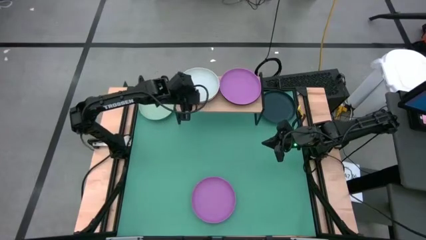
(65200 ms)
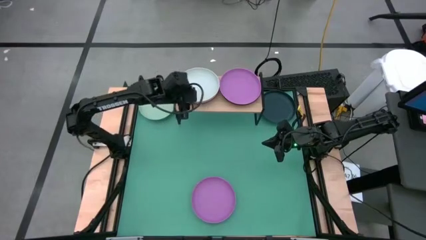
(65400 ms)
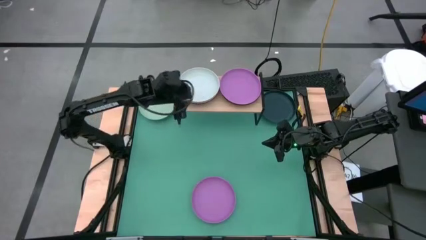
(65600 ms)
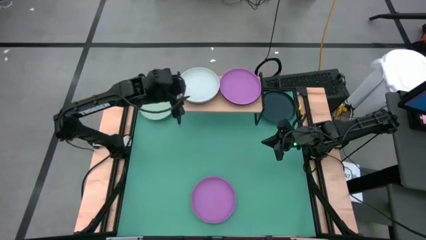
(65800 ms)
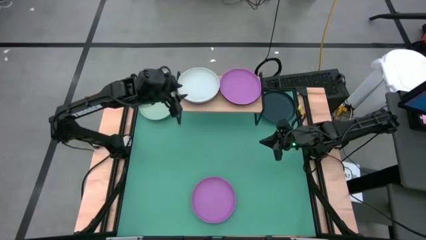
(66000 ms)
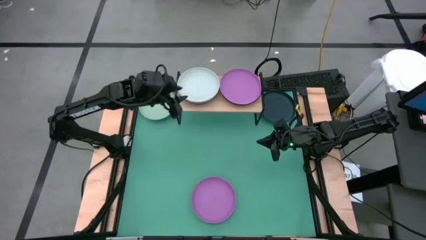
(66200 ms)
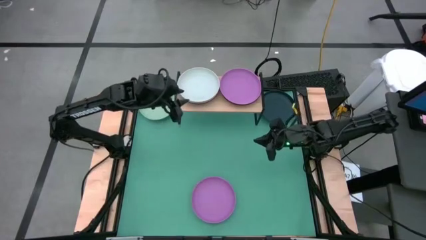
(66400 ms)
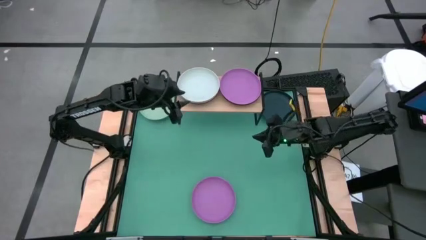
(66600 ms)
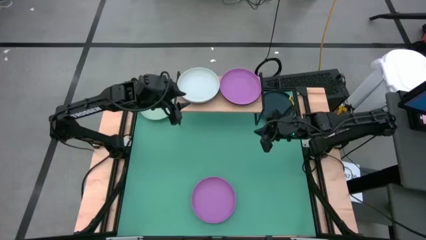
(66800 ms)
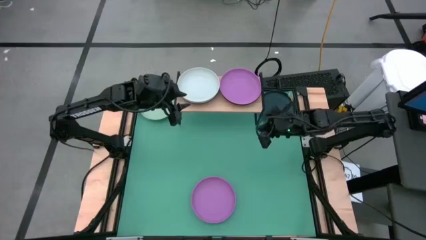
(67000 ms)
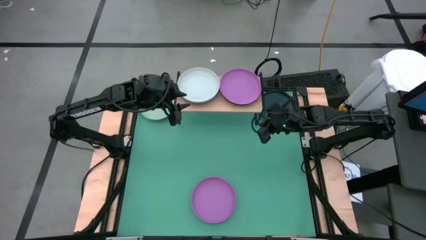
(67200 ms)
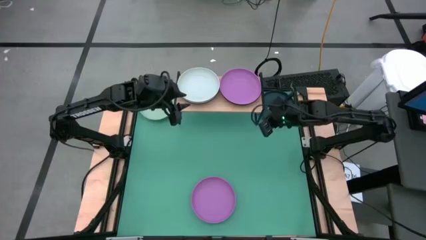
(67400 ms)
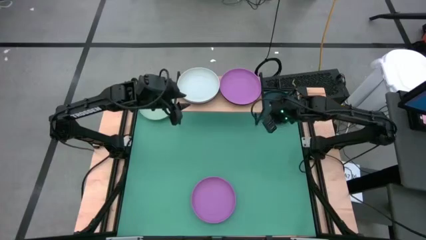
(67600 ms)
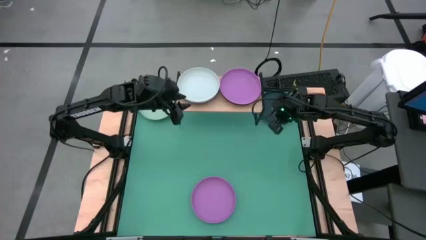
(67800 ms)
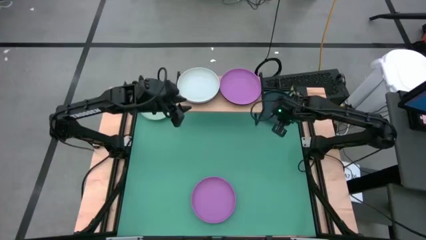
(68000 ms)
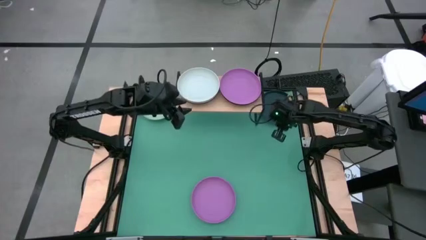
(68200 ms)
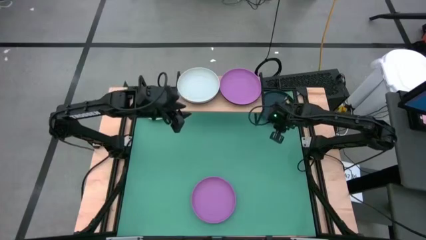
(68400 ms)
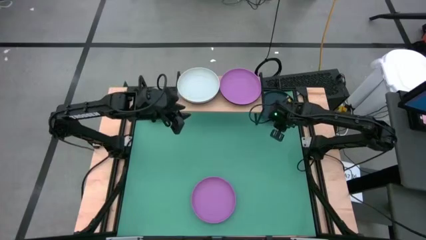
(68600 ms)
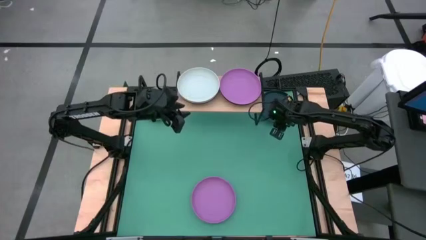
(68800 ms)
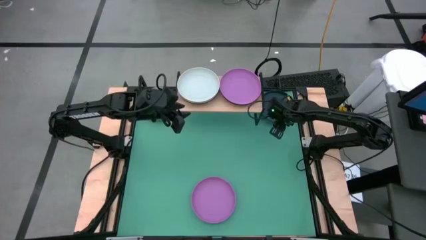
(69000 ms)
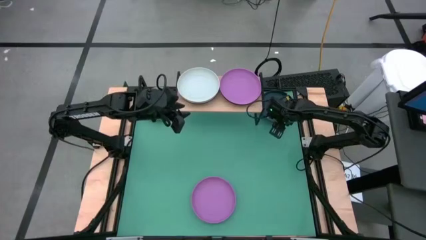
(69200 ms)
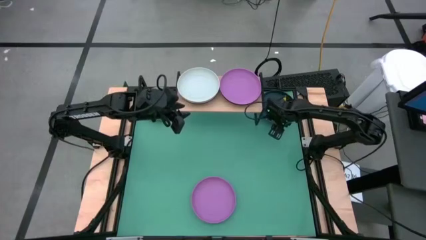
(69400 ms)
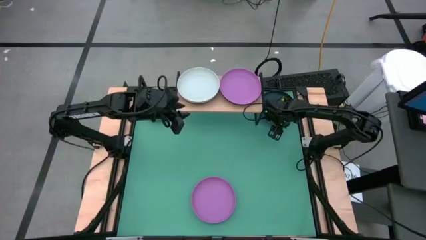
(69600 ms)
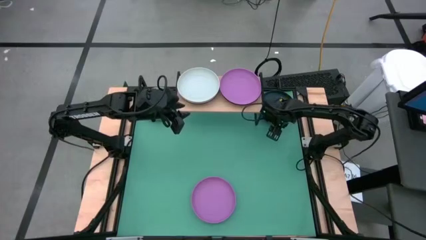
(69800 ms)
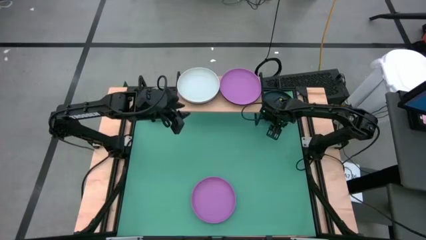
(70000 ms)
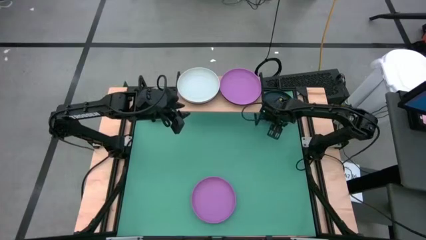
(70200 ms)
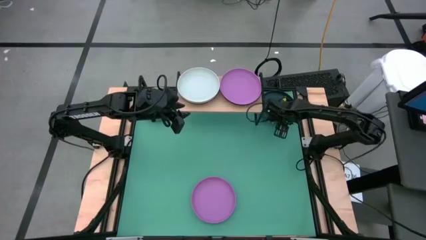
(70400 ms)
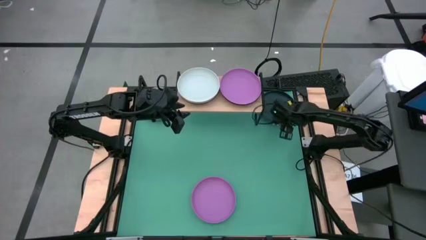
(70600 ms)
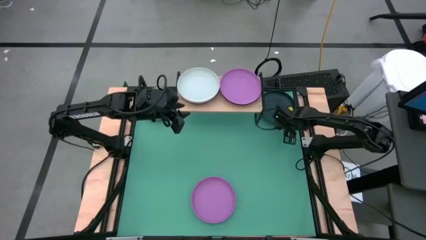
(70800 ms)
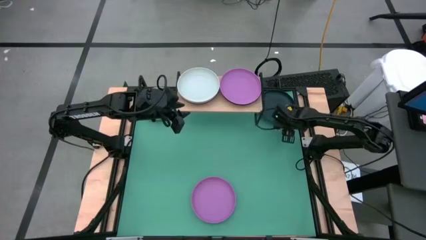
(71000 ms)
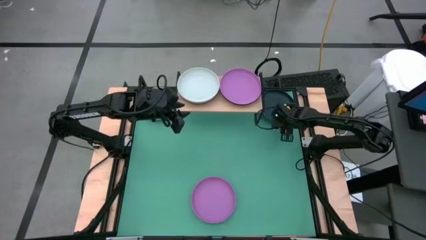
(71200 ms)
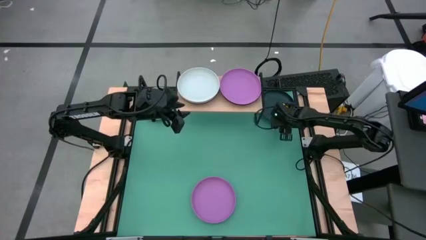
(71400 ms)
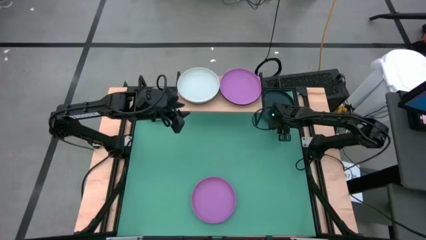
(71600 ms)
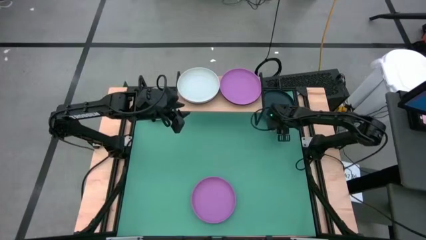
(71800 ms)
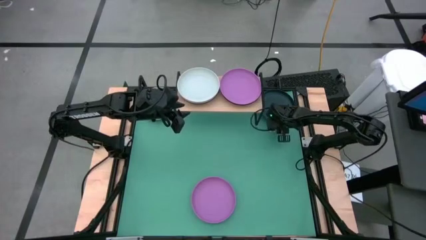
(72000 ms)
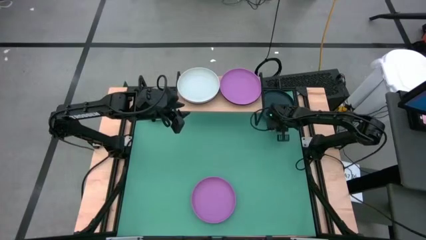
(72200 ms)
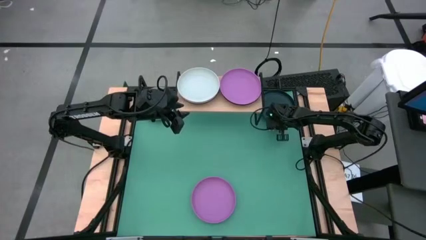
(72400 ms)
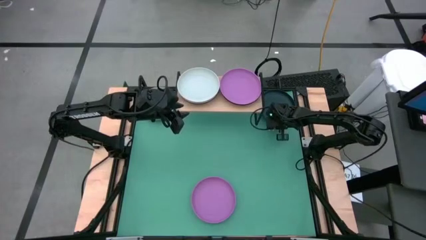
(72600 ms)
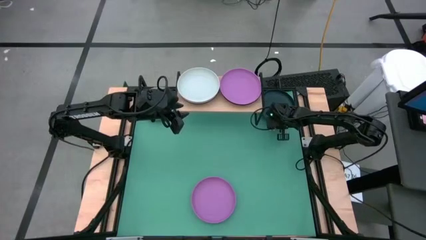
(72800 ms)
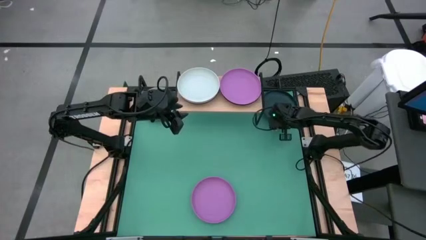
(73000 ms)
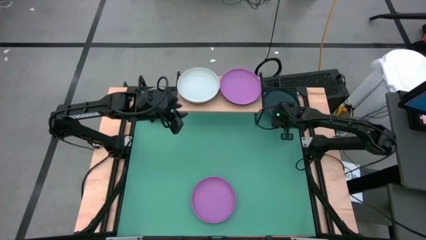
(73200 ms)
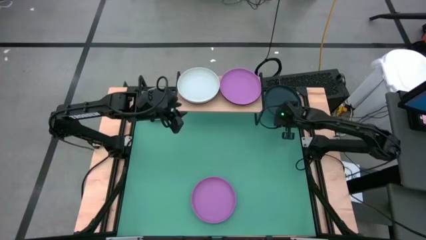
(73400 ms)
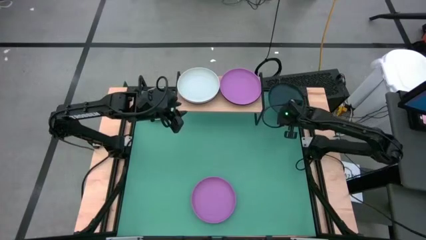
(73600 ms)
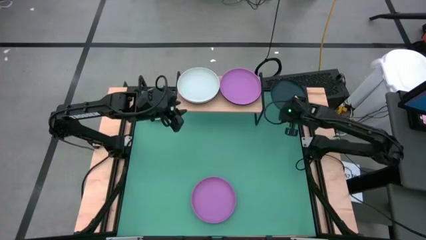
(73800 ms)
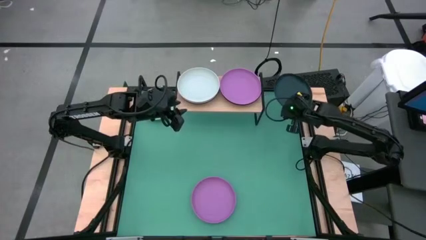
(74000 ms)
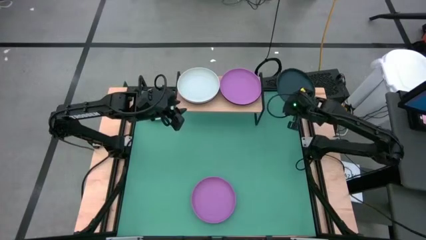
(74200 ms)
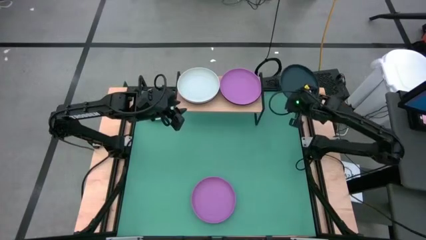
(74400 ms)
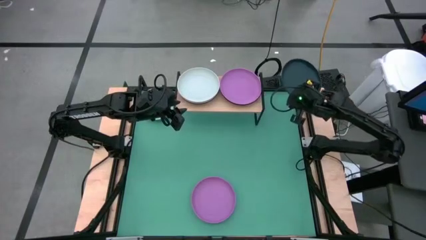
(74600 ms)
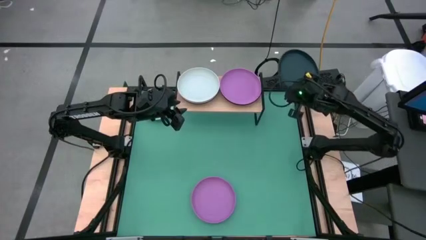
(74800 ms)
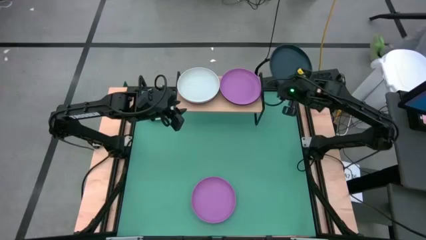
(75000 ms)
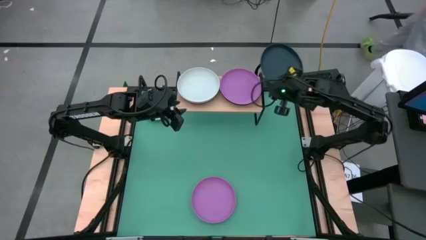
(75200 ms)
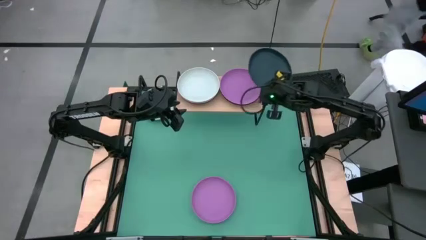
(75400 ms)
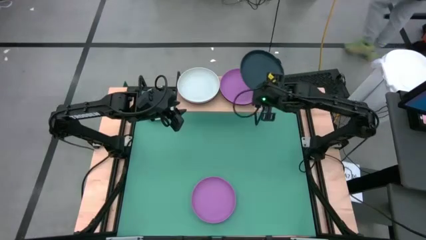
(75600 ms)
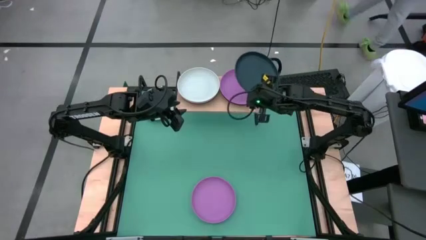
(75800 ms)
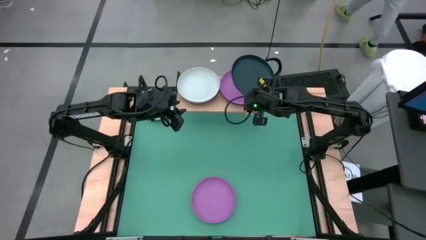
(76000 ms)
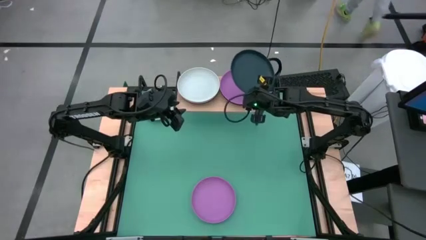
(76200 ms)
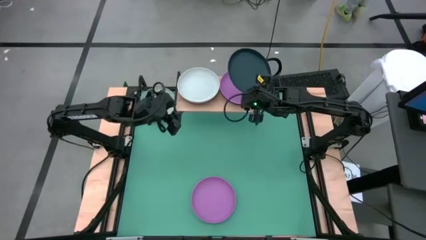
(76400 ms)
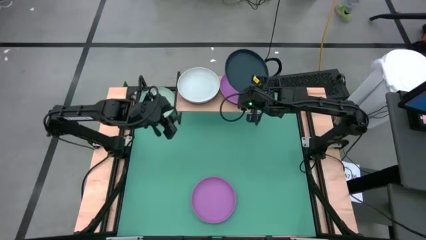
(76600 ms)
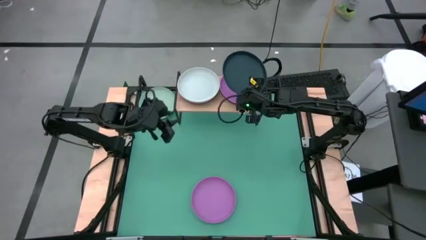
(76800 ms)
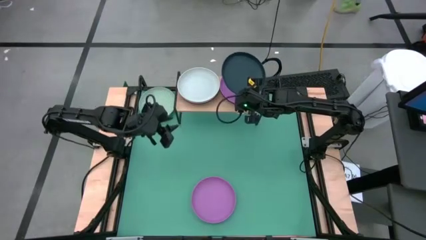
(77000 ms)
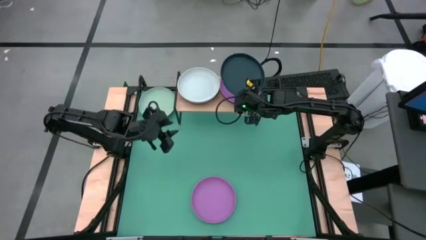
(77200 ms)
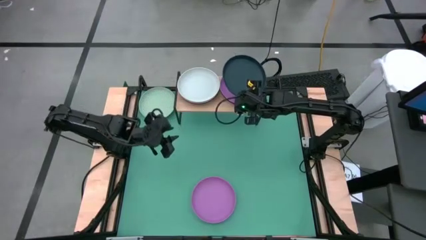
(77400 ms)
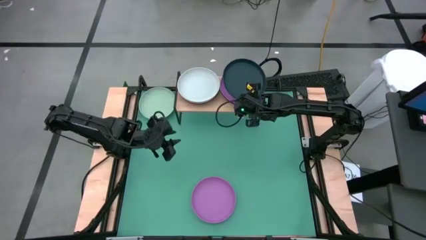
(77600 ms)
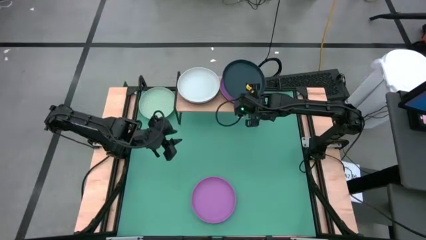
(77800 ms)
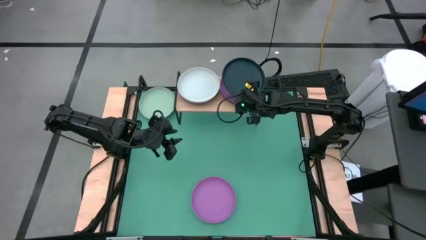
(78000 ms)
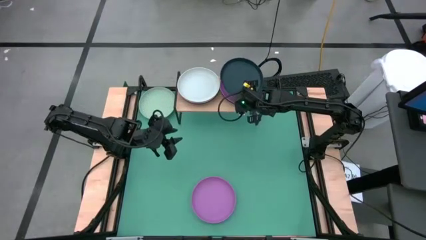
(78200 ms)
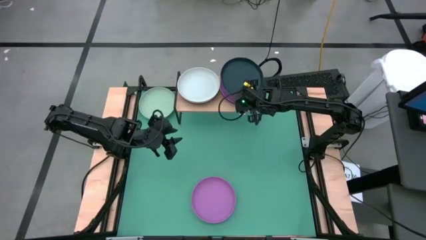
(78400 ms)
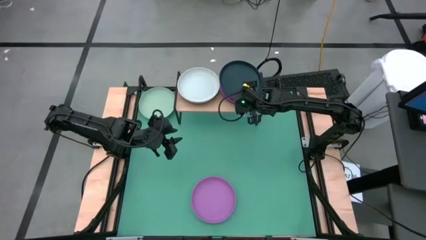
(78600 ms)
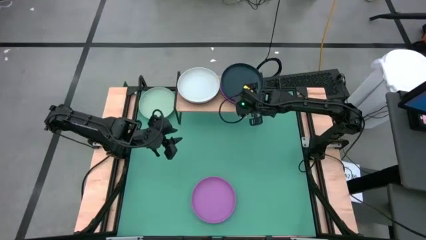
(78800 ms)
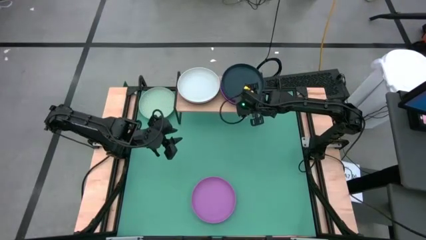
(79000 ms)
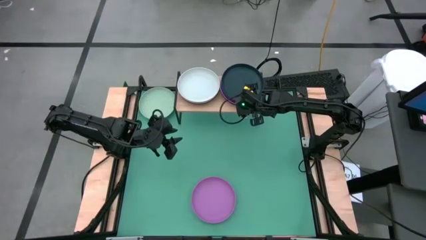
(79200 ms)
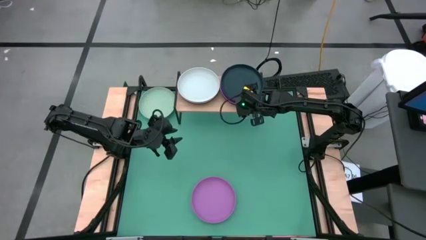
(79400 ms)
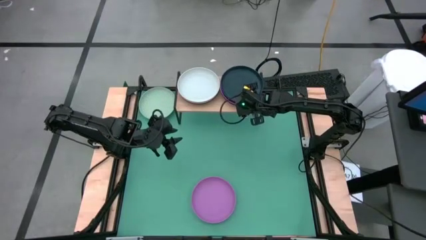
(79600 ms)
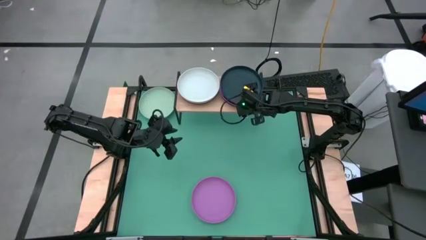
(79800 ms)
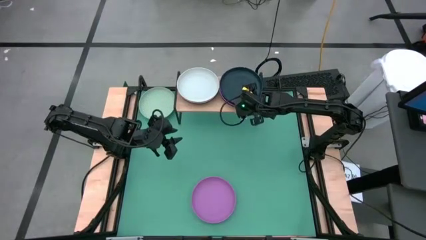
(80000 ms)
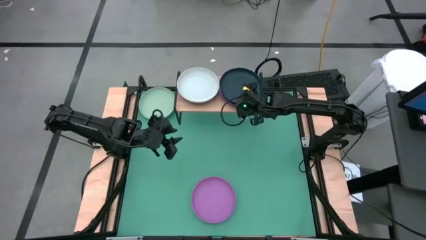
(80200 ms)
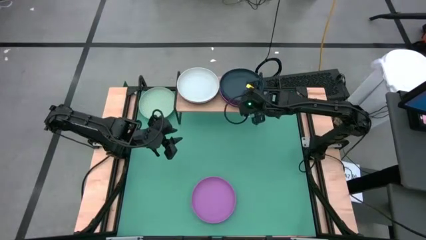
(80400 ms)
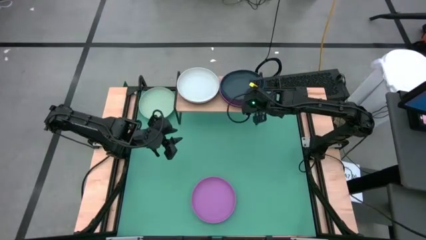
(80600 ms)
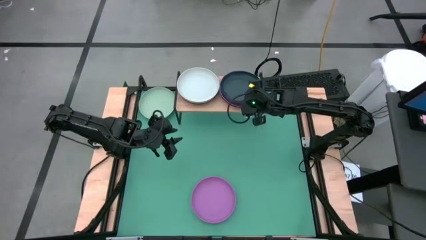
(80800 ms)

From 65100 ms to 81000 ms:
Task: Place and stack plates onto a shelf
Stack the dark blue plate on top of the purple plate on the shelf

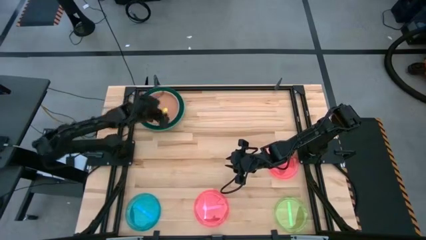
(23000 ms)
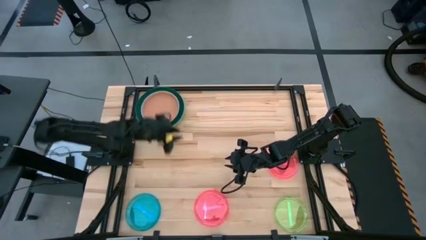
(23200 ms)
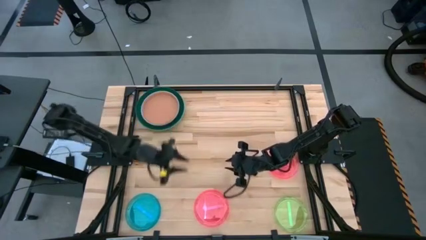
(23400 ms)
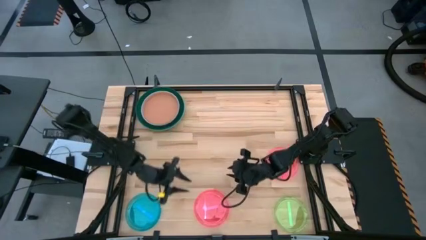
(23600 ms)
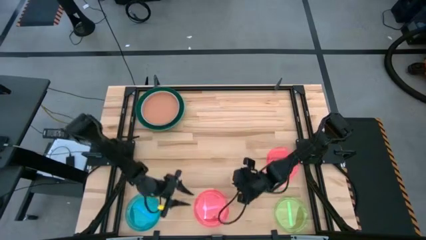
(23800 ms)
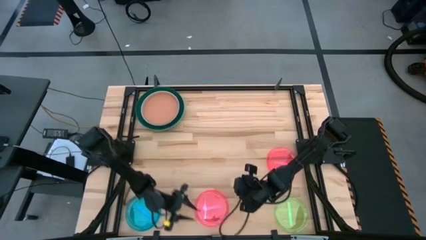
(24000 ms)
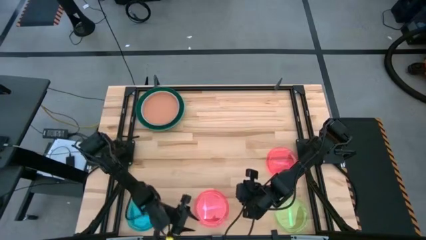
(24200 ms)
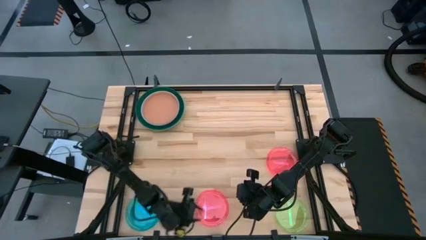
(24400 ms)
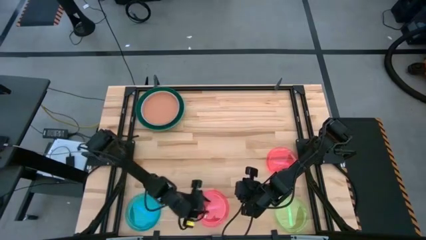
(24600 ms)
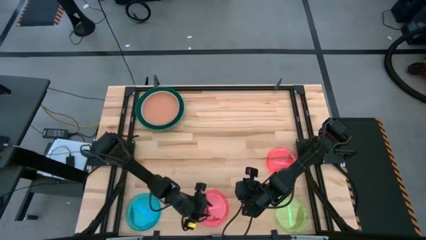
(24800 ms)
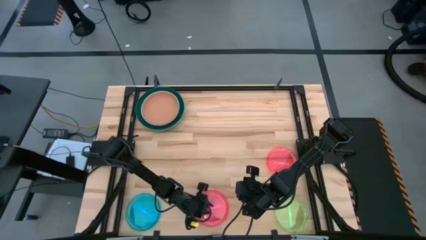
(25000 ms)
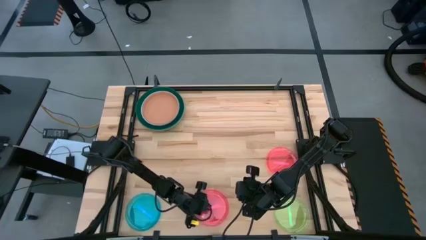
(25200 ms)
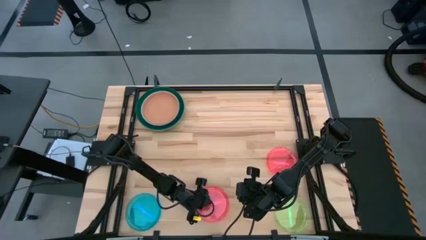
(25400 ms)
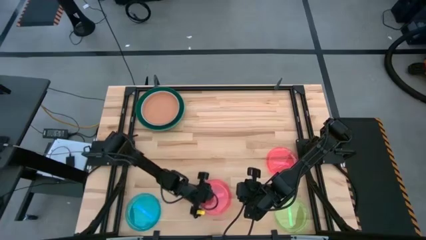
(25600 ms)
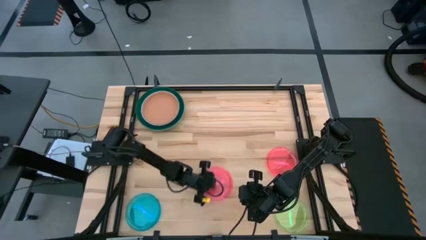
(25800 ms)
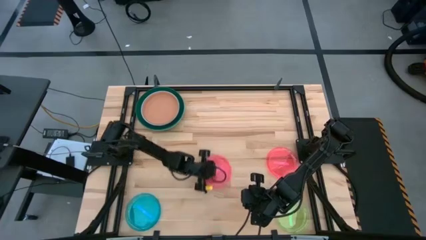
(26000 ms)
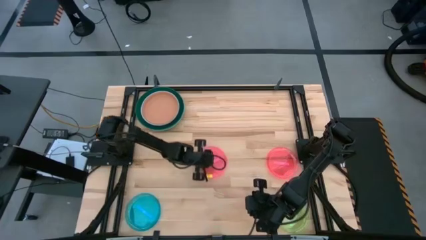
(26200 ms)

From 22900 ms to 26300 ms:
Task: Stack plastic plates
Move the bottom pink plate to the center
